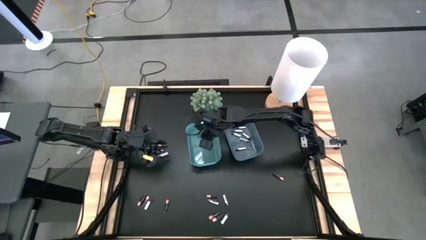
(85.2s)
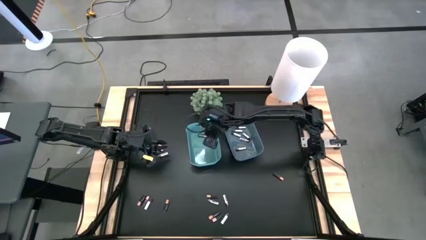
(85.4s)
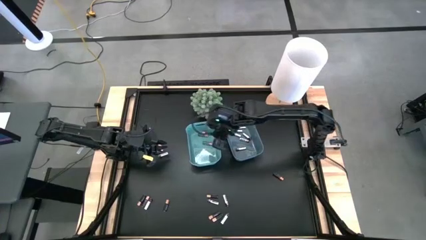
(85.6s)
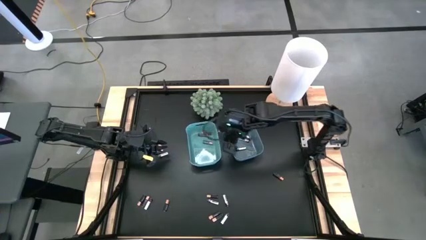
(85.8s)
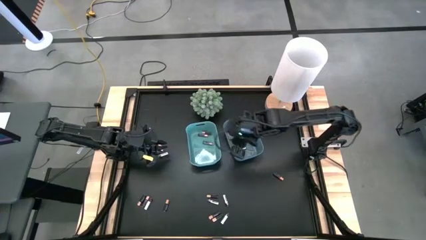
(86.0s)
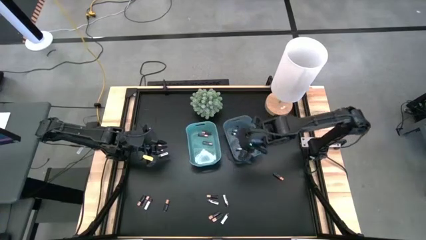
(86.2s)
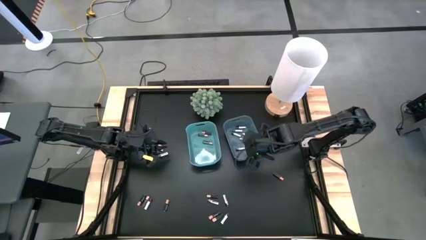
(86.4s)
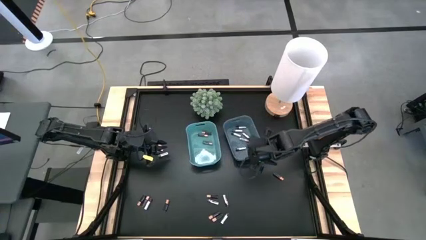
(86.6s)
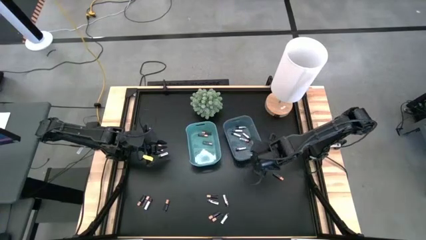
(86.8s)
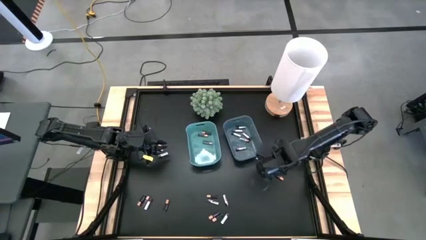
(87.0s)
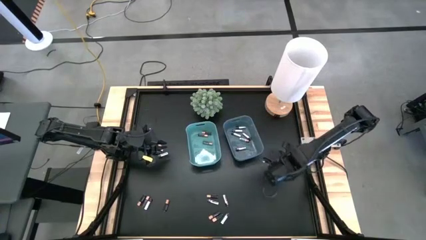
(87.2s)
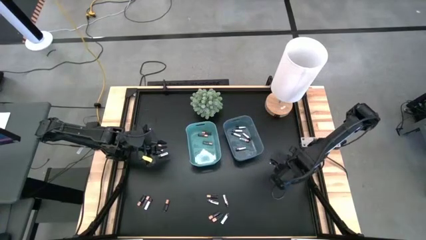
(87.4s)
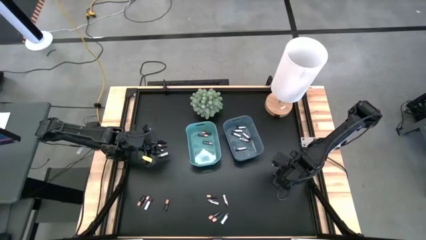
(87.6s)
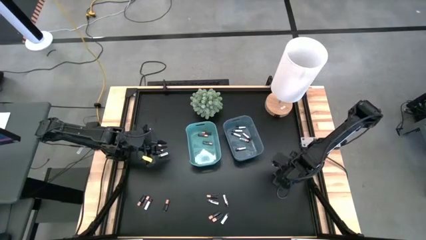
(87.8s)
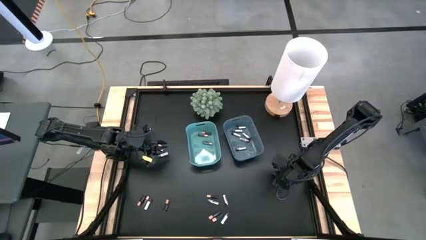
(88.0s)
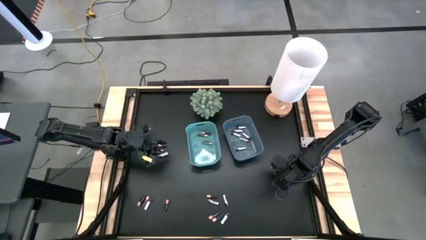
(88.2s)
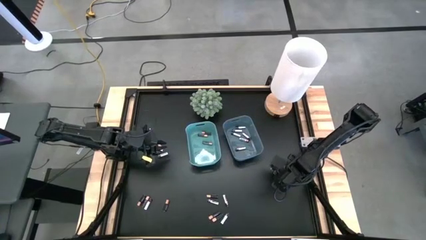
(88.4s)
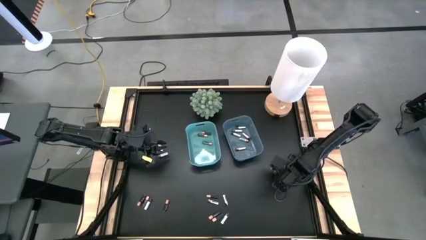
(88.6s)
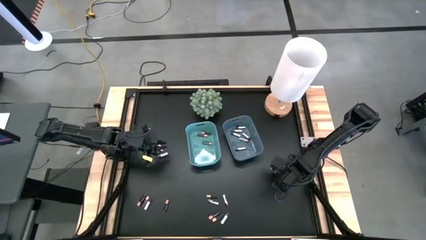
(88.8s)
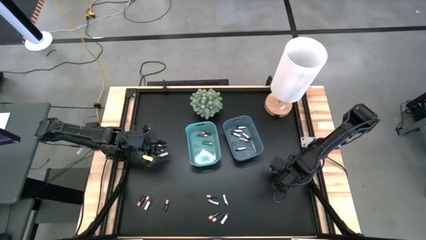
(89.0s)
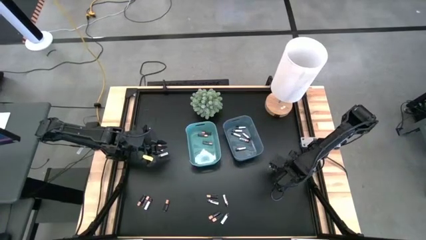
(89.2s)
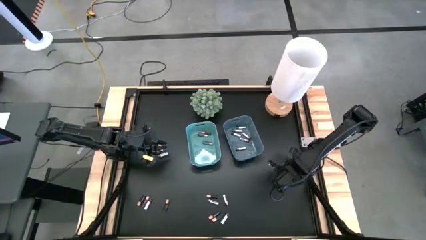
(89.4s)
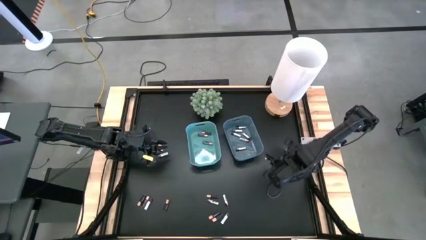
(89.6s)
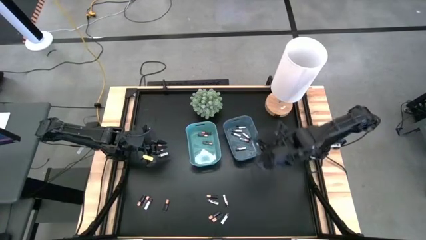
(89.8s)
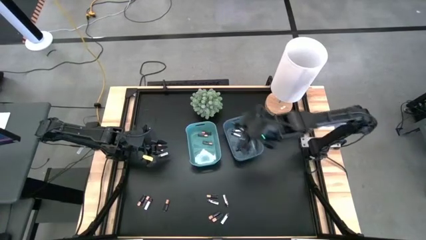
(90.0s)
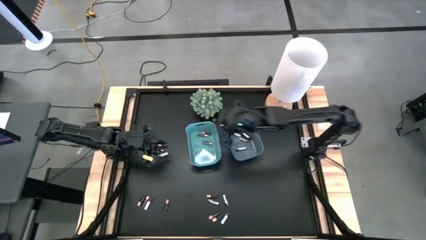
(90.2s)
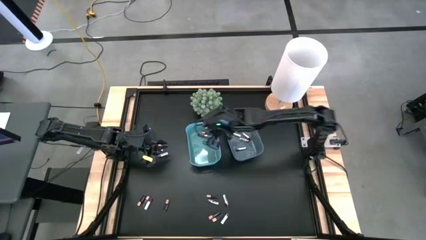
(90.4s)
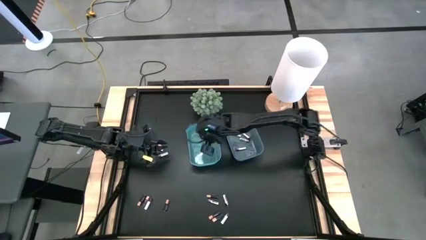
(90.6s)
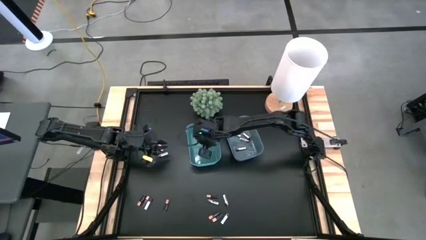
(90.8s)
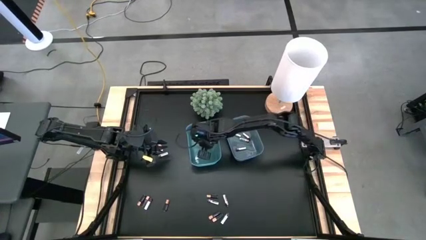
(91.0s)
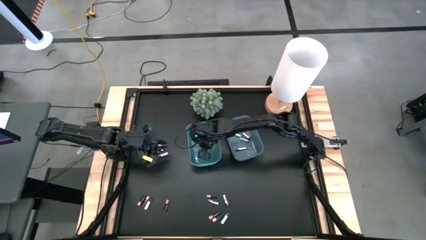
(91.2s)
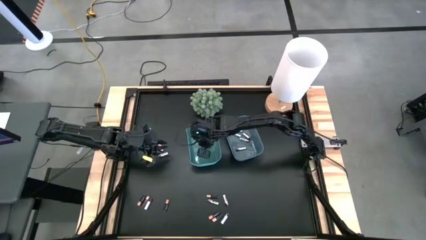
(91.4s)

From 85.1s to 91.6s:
Task: Sort batteries
Put the black battery into the green bin

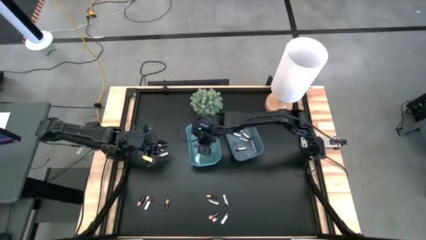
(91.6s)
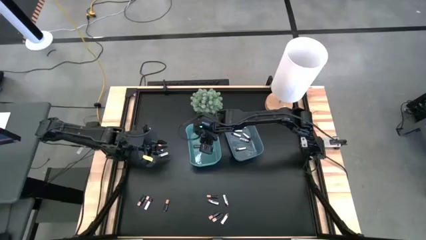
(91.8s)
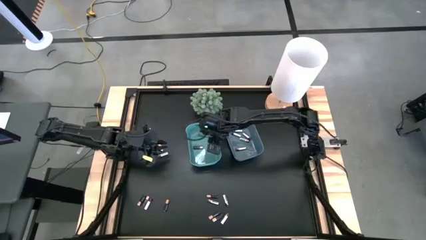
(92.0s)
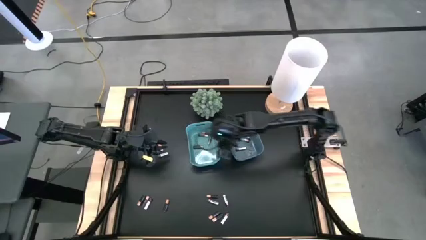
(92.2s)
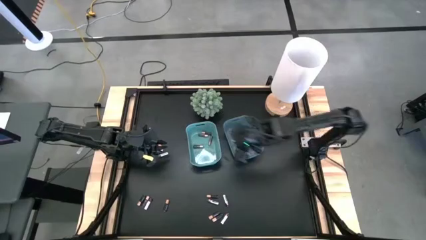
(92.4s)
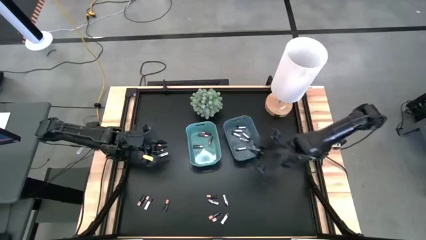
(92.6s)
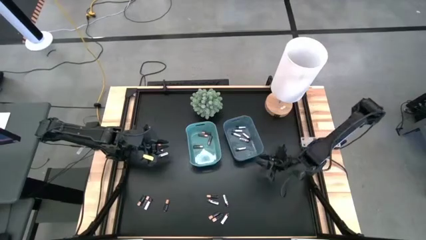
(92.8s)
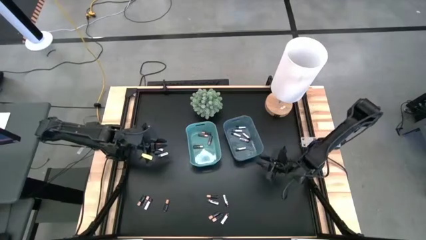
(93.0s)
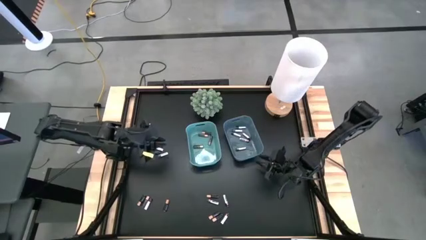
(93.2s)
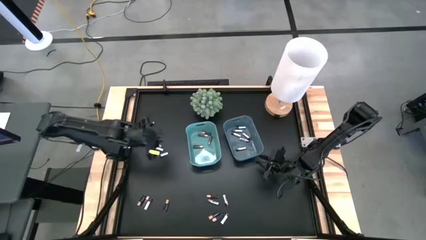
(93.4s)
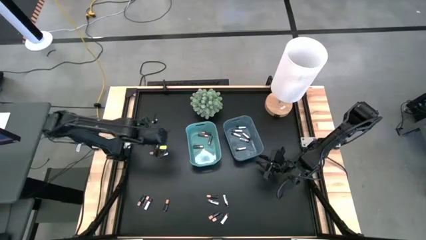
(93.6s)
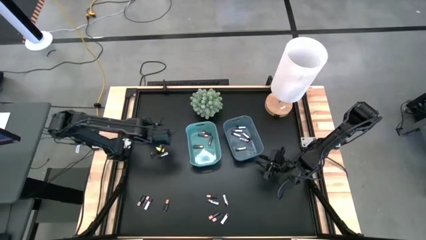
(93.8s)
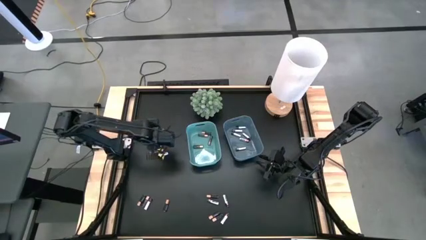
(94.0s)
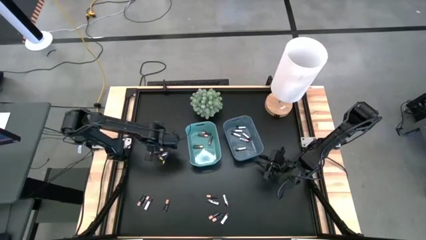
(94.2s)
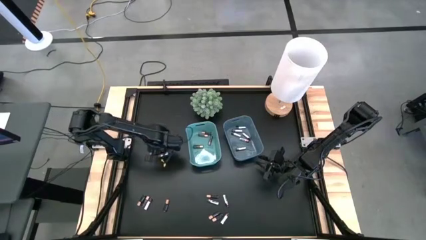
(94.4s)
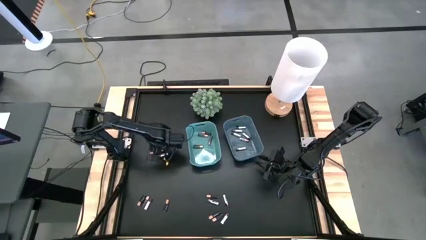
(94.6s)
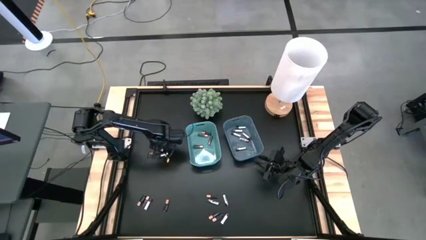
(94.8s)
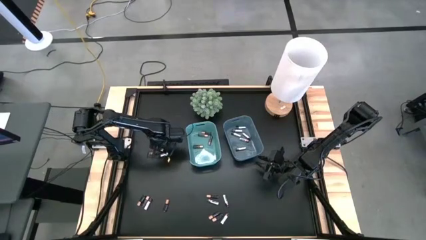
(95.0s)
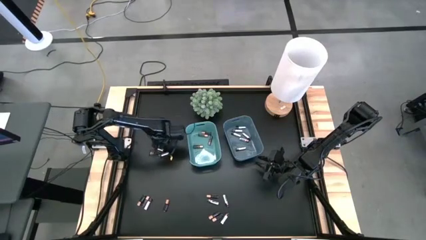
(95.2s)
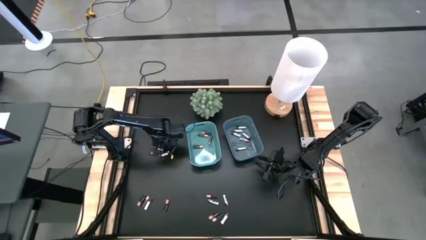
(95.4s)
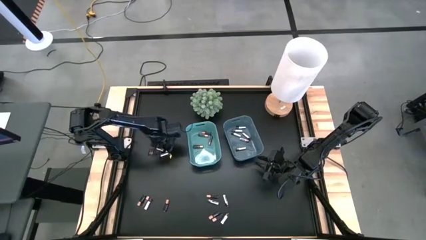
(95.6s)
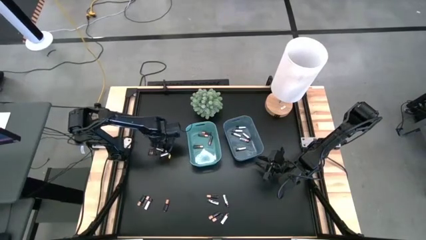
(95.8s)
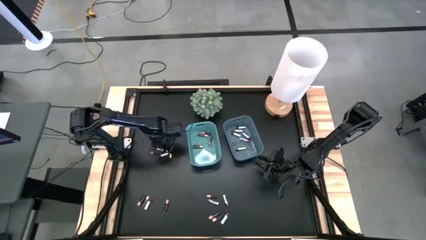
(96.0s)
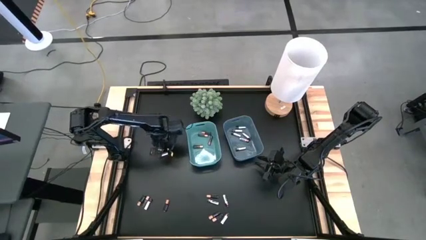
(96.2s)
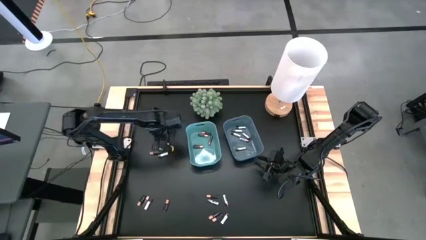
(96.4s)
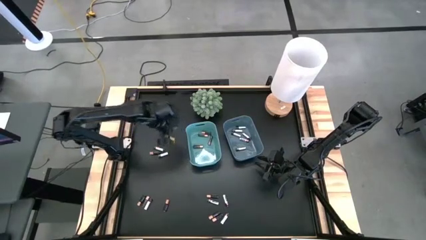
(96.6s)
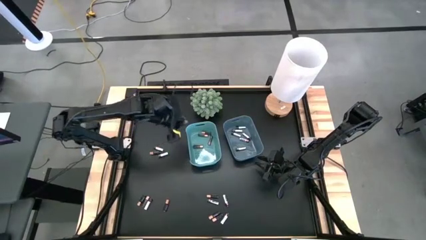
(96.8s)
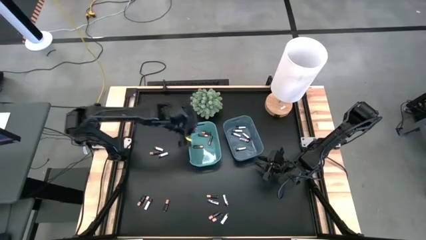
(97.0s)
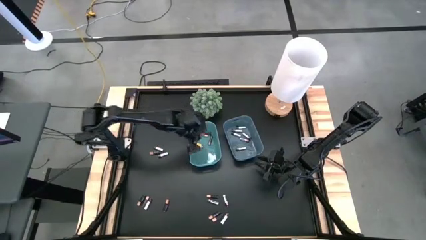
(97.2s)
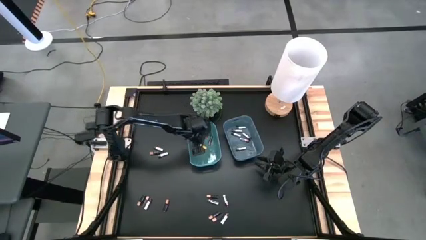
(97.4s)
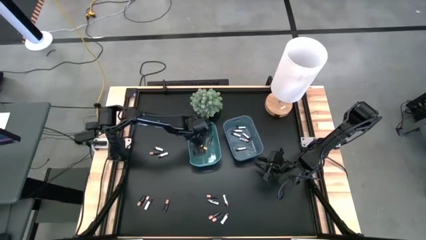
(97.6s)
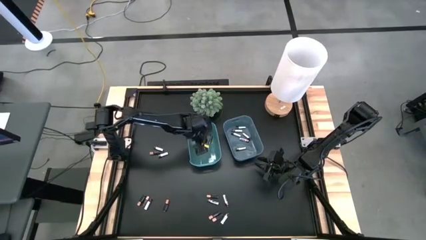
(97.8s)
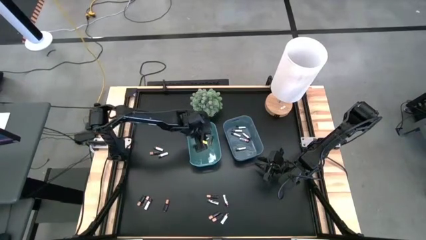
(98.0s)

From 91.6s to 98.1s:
Put the black battery into the green bin

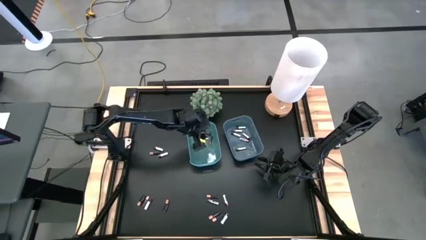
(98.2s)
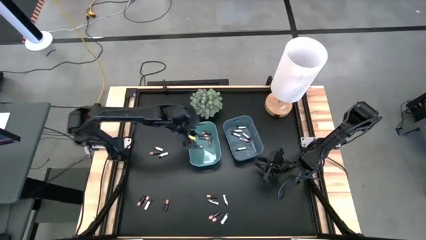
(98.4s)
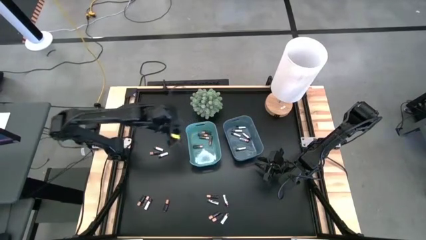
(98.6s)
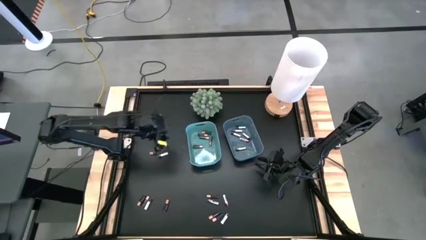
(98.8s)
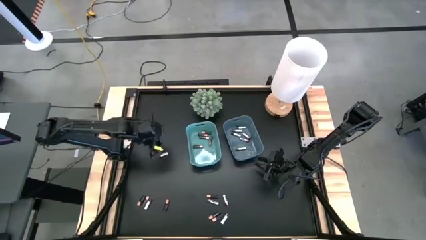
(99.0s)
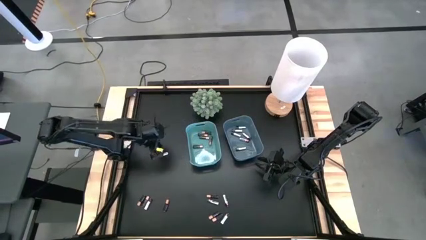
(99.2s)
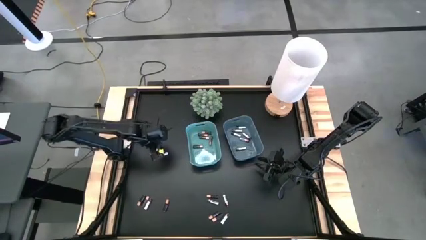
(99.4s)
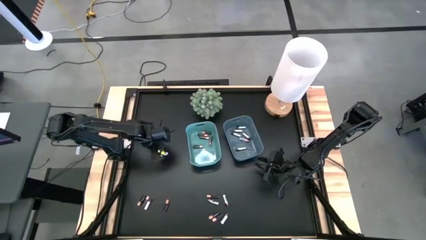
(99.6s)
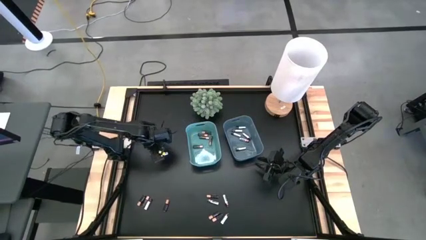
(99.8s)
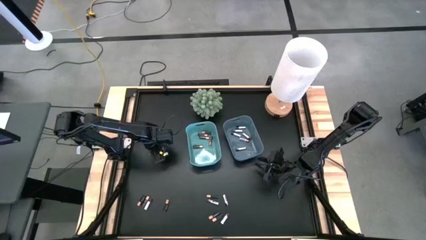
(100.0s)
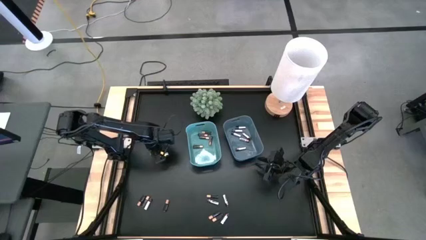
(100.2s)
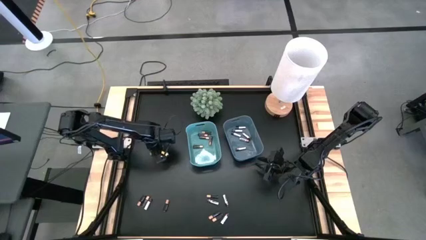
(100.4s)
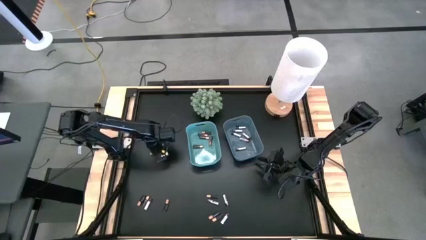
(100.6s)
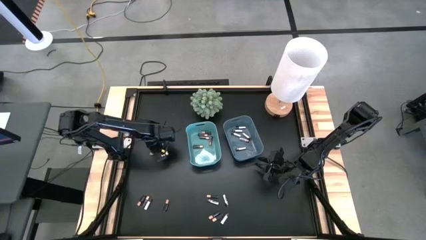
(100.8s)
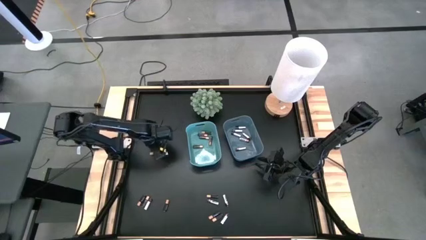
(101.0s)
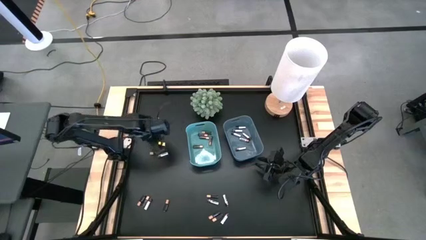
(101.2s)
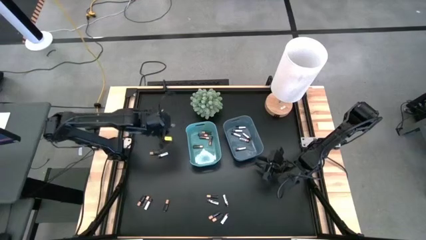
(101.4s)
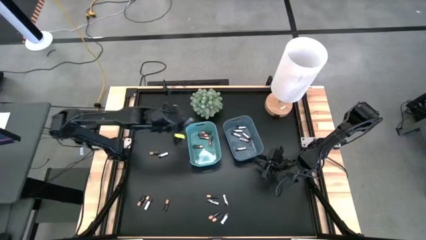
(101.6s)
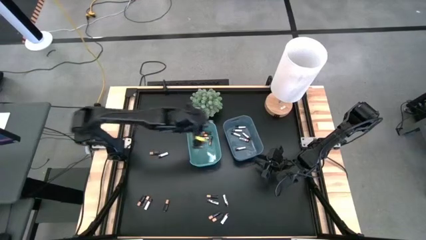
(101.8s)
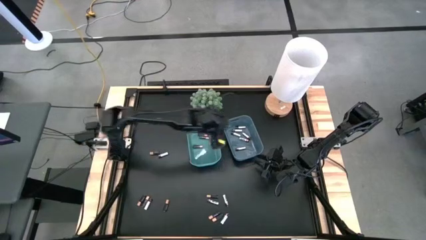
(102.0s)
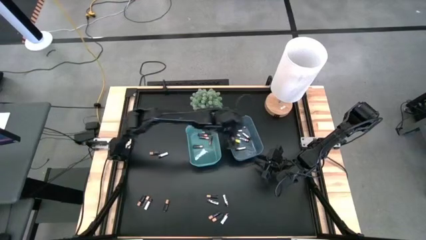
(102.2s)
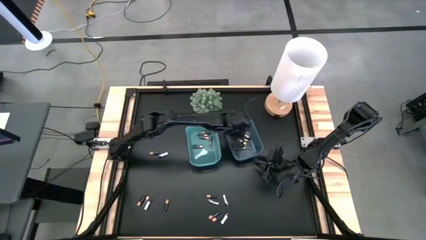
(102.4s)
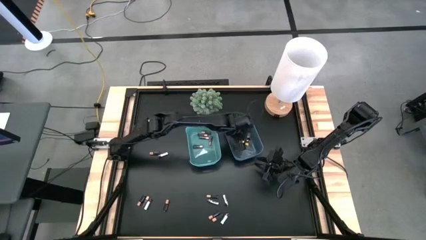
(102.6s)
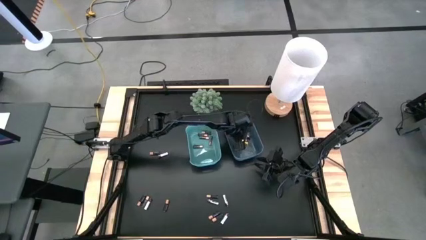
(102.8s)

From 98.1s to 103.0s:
Put the white battery into the blue bin
